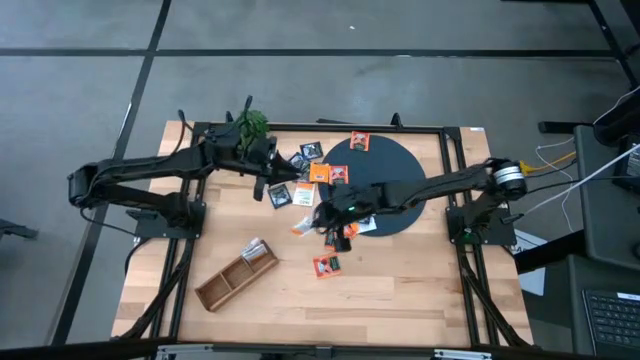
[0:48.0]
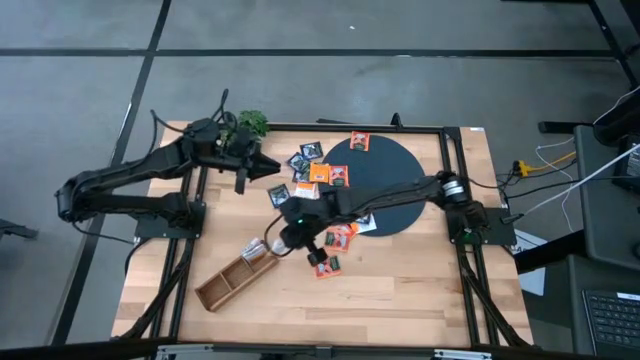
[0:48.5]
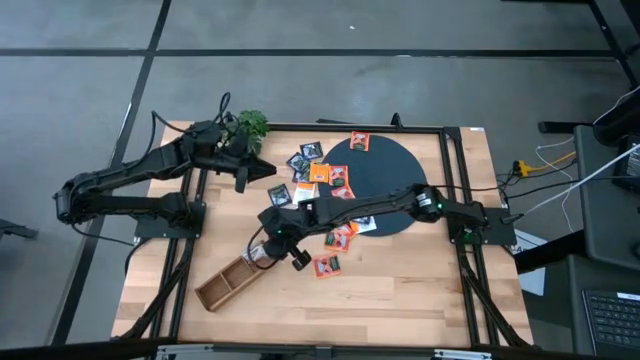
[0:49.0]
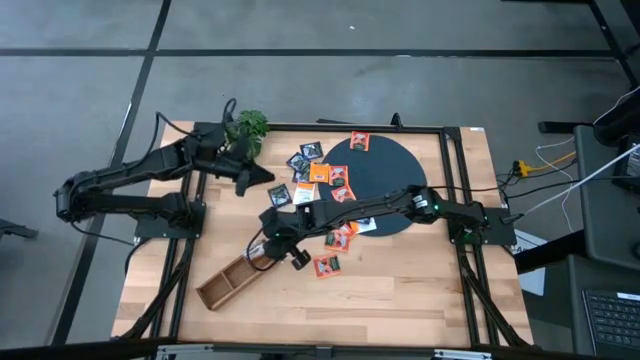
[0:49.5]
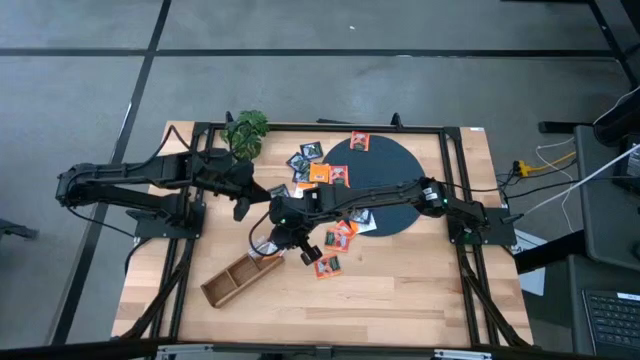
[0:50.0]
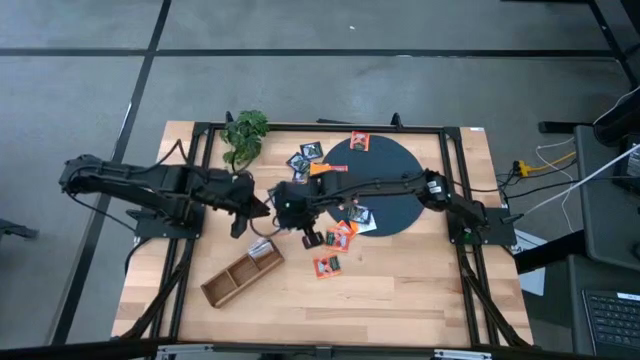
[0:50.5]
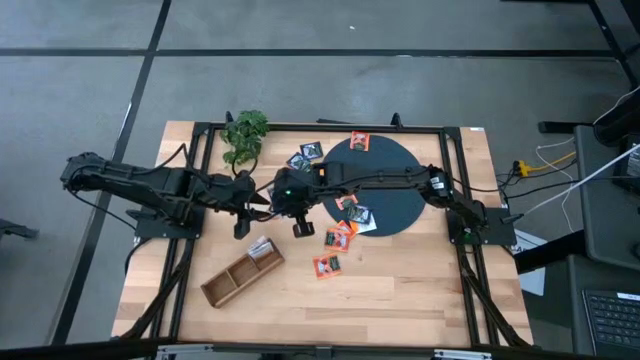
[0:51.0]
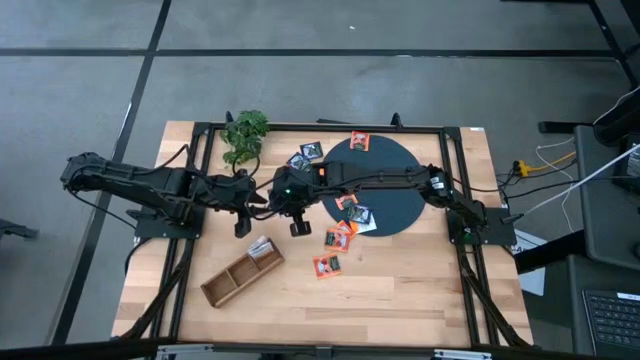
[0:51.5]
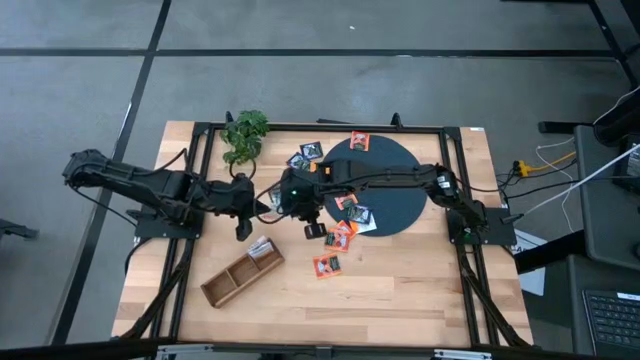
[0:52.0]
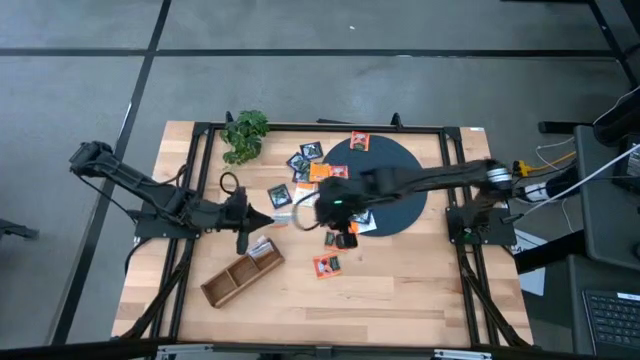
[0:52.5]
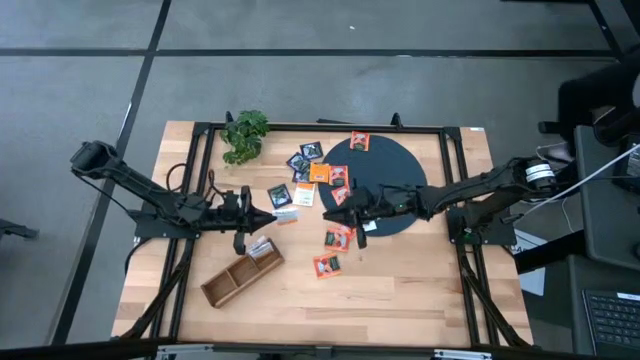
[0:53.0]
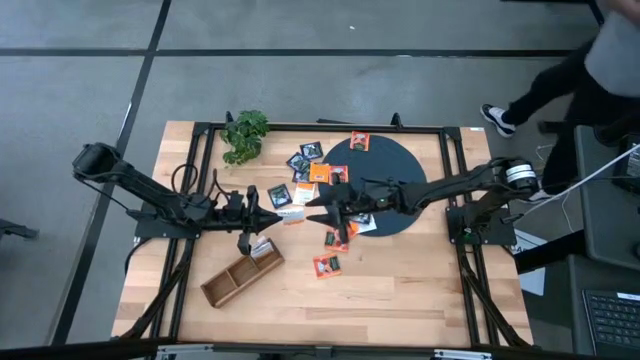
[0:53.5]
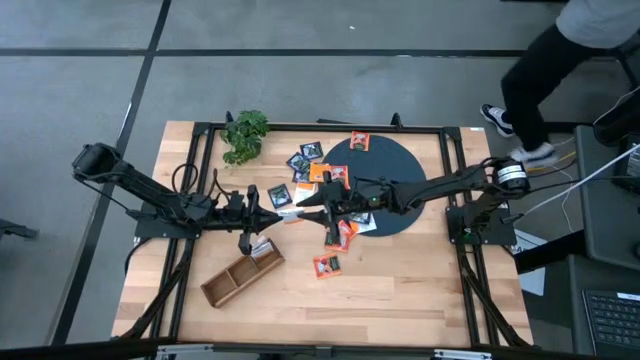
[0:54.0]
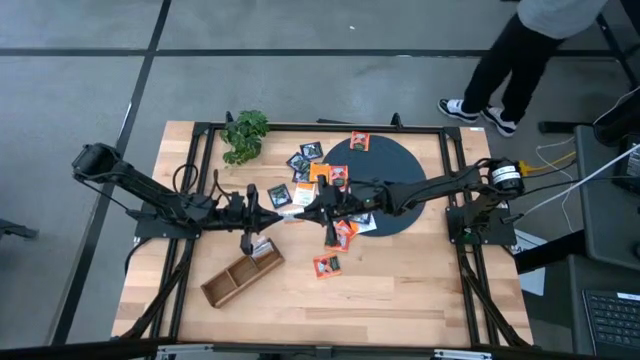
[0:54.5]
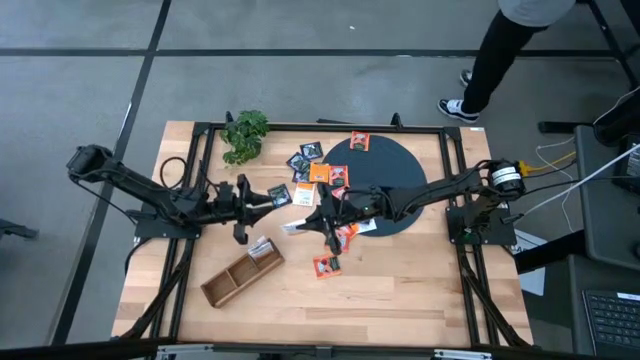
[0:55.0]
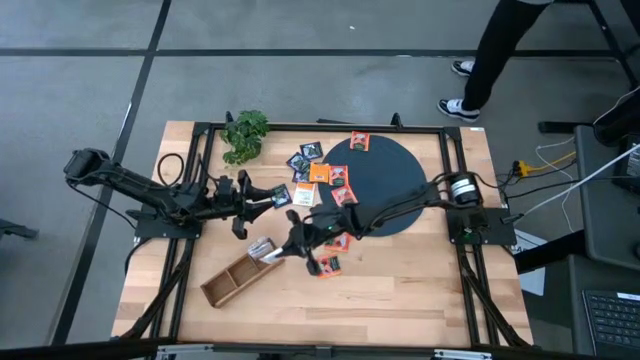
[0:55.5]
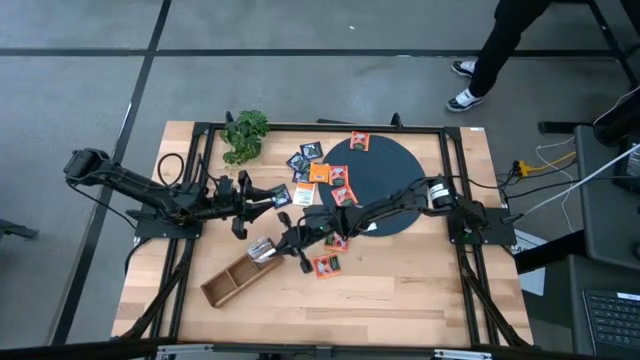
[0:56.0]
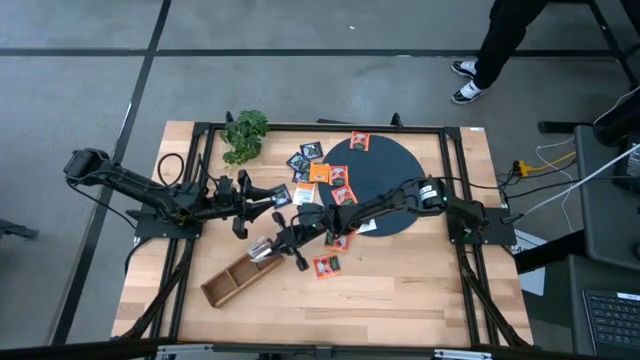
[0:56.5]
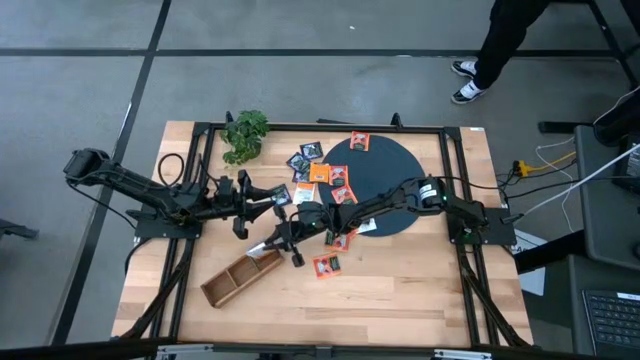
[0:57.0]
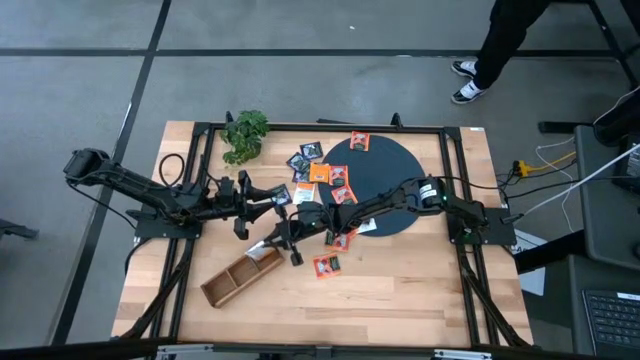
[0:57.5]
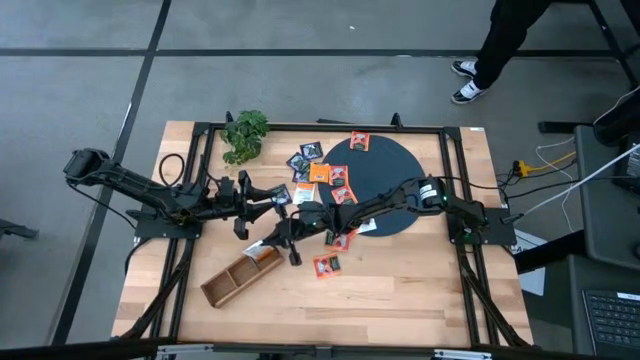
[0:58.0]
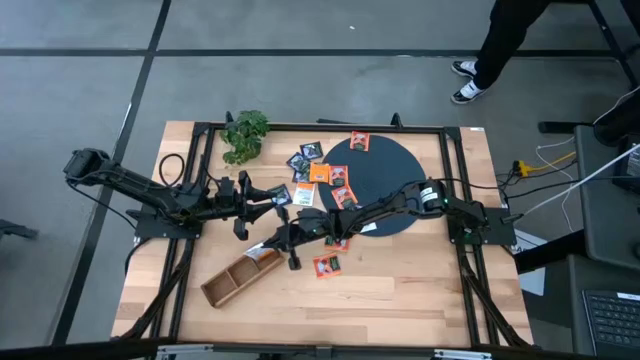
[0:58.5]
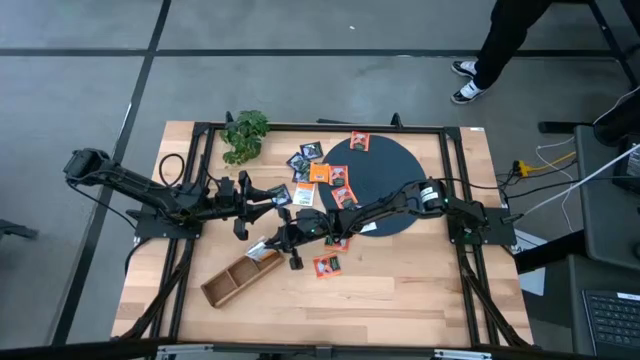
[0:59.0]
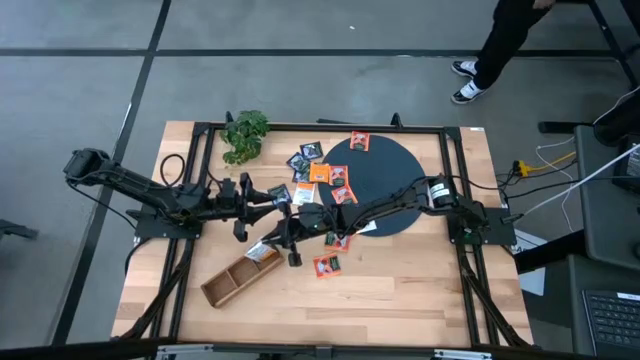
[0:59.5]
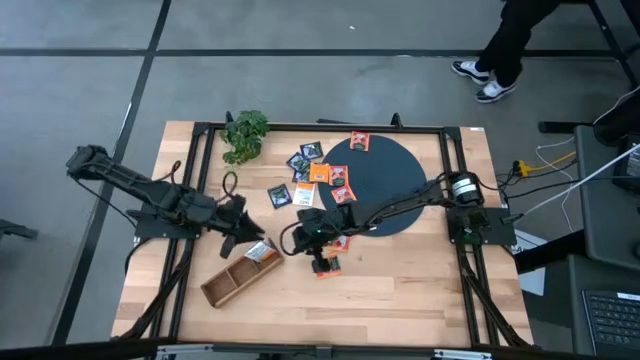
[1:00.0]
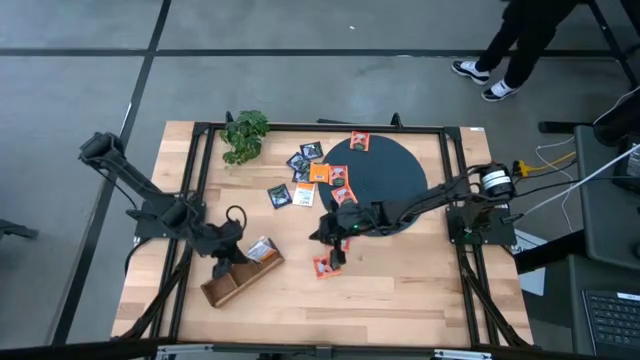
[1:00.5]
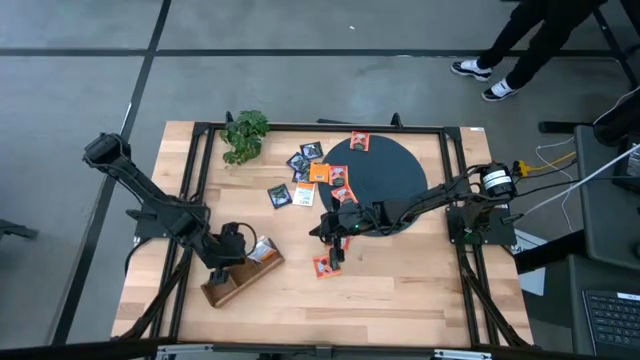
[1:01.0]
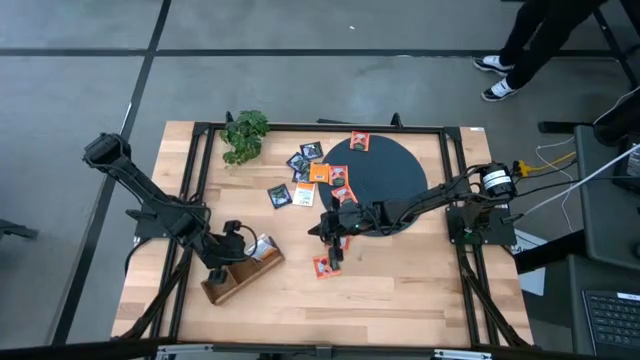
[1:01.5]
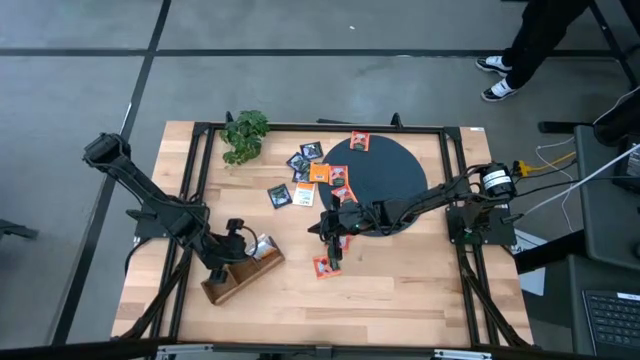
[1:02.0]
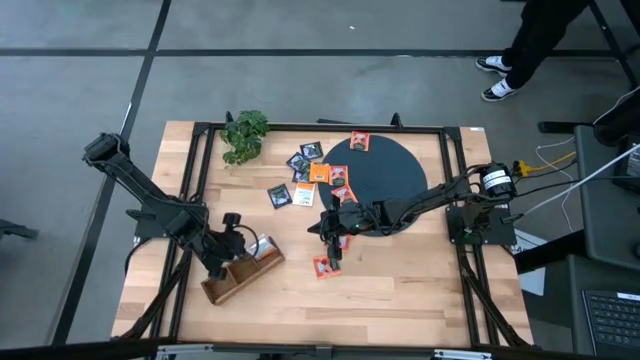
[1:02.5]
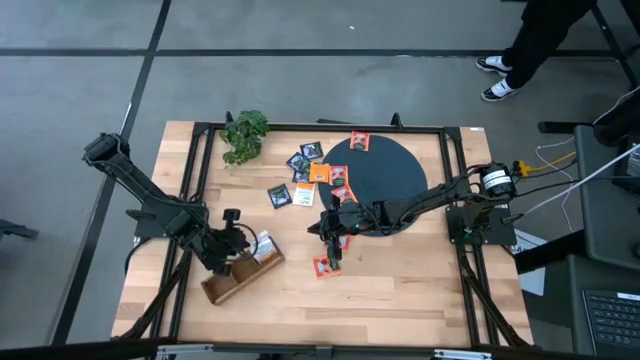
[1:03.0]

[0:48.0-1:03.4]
Task: Pick & Place Tea
Put the white tea bag into the right section of the wooden organizer

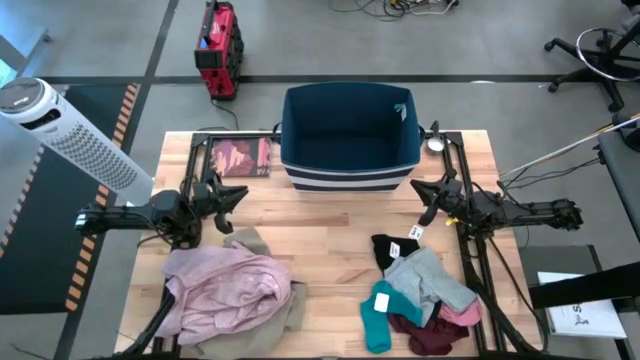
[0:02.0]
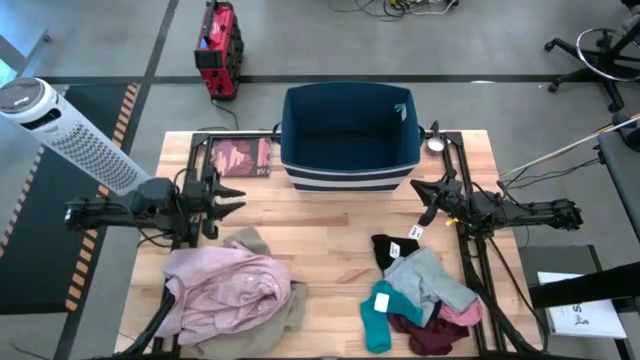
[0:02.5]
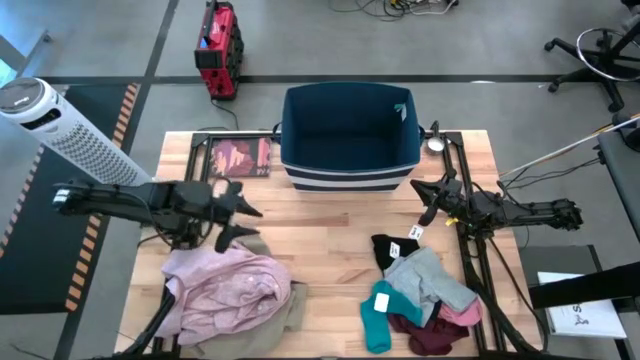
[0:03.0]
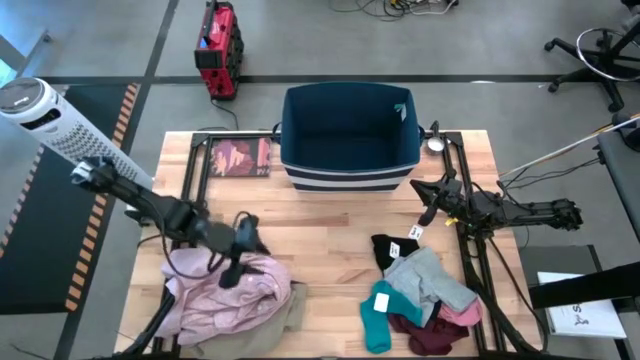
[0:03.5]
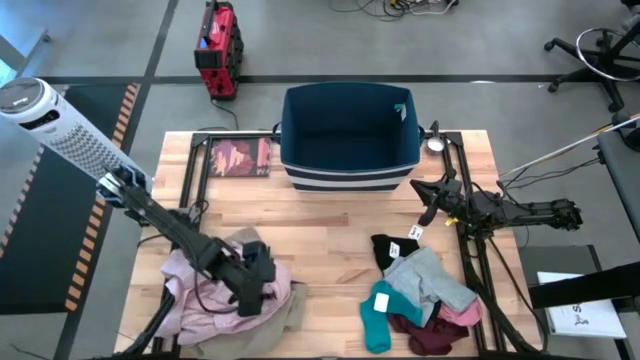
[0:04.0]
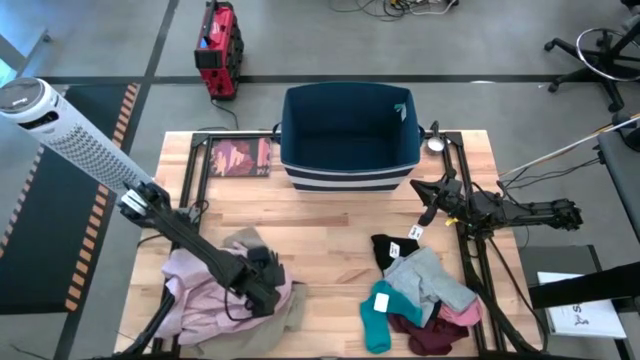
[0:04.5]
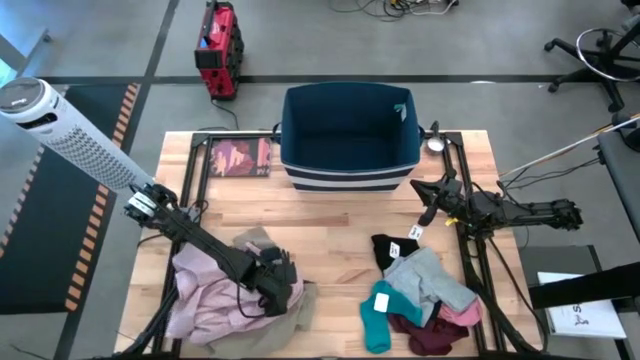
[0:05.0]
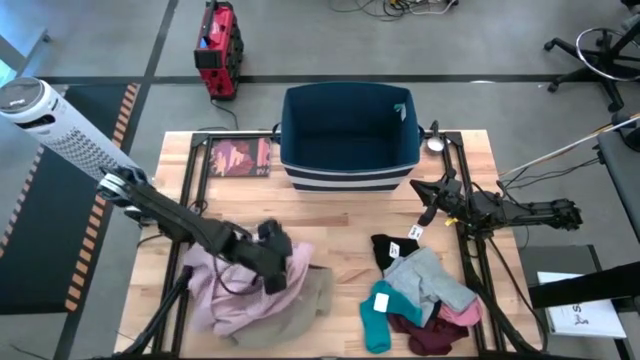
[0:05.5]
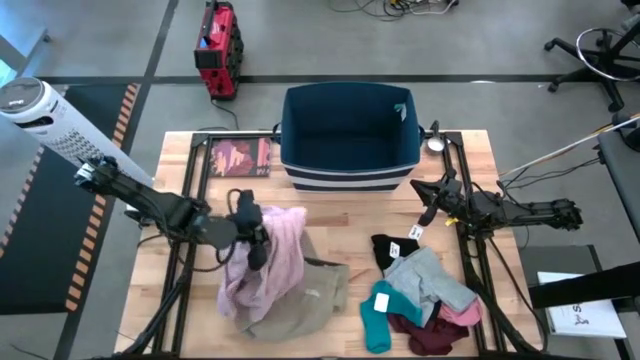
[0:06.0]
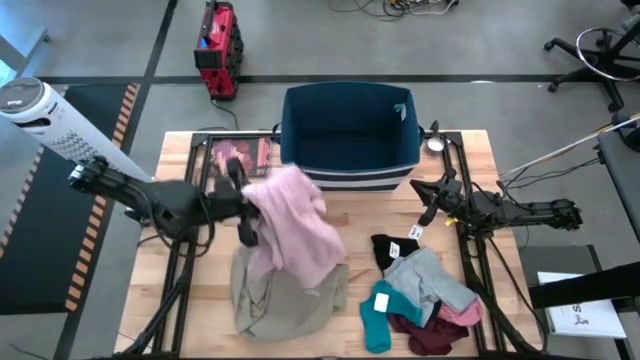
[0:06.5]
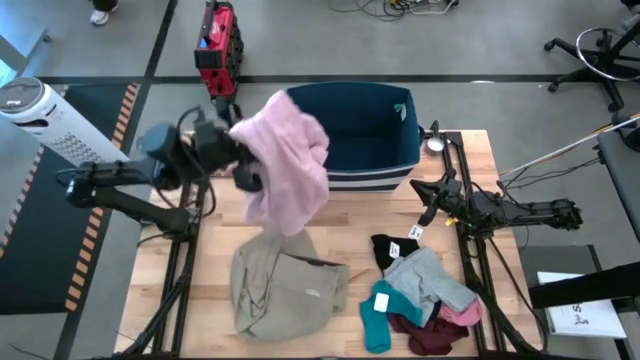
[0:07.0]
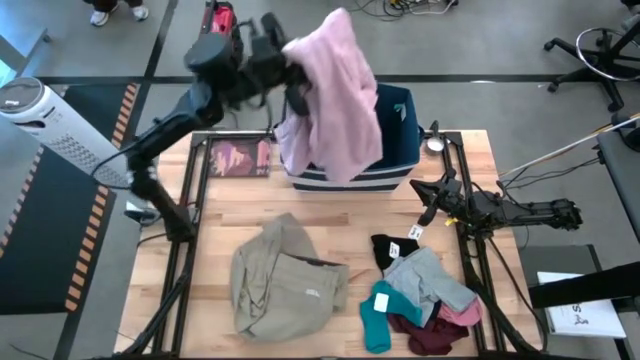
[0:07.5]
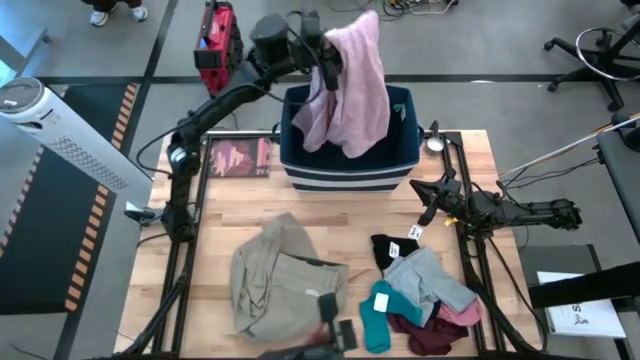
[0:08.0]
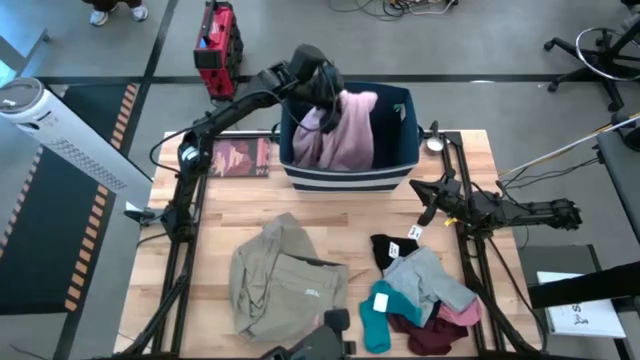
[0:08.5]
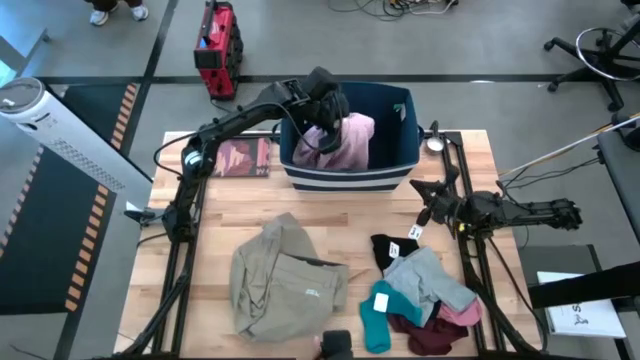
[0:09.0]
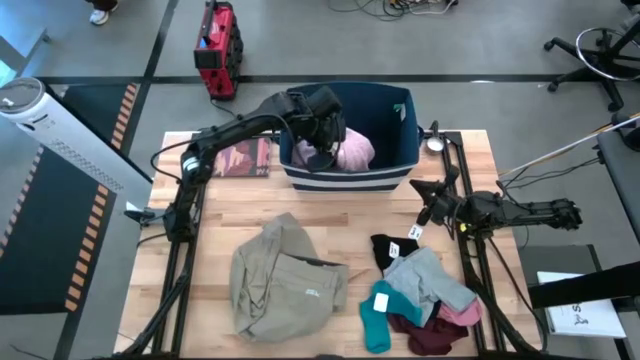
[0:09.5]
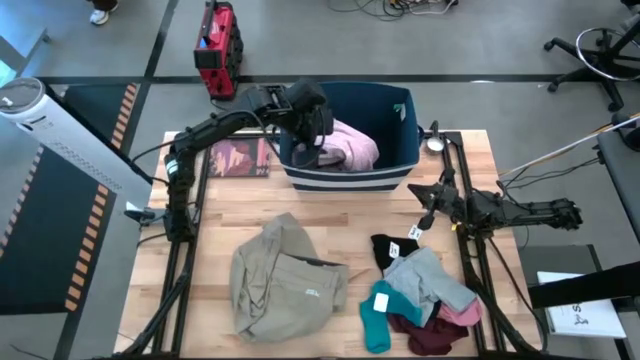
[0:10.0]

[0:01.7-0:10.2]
Task: Sort clothes
Put the pink dress into the blue bin
